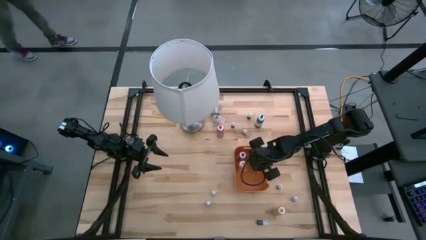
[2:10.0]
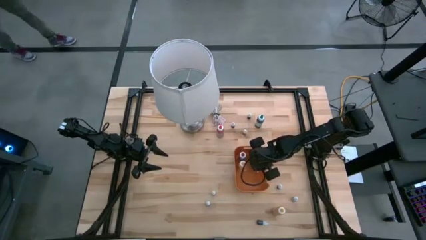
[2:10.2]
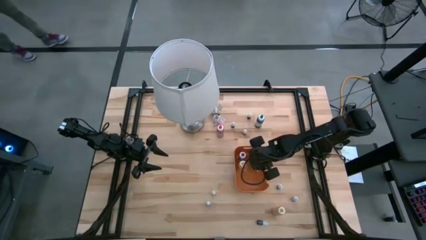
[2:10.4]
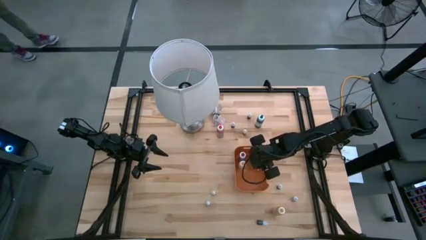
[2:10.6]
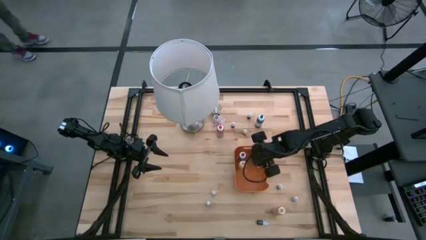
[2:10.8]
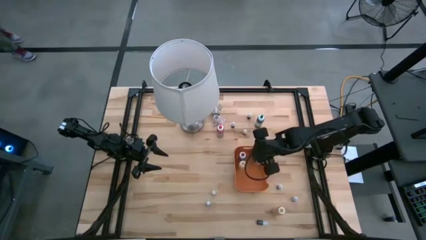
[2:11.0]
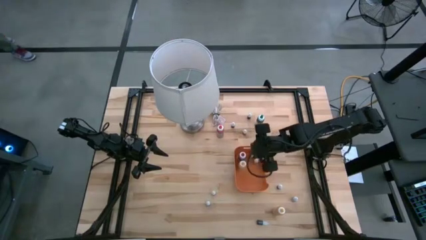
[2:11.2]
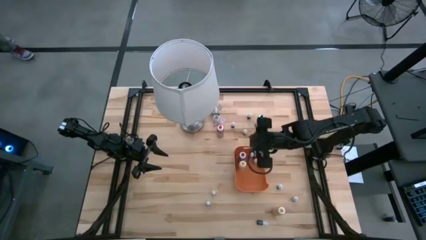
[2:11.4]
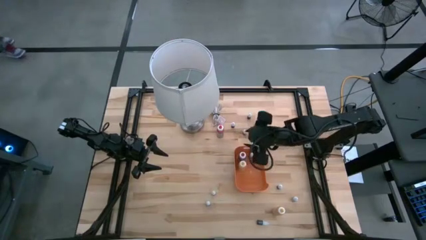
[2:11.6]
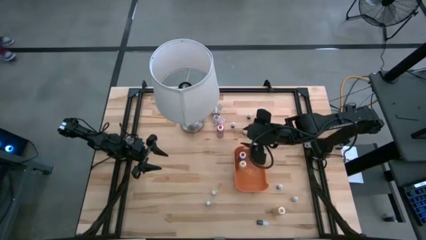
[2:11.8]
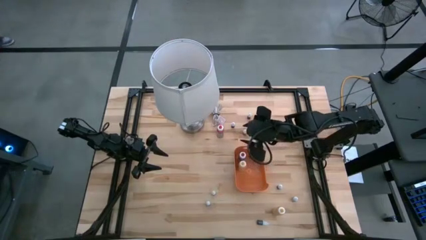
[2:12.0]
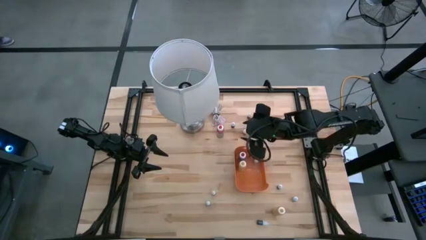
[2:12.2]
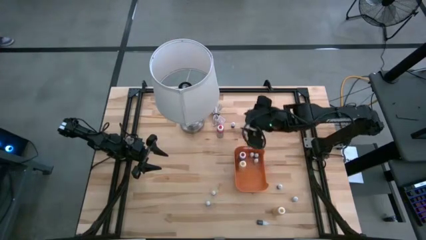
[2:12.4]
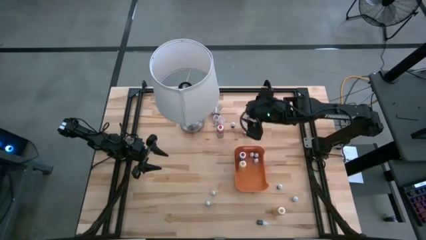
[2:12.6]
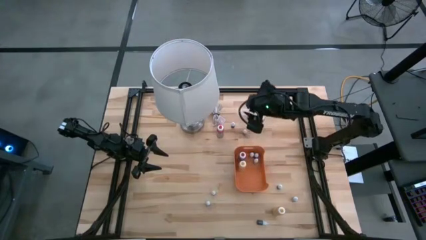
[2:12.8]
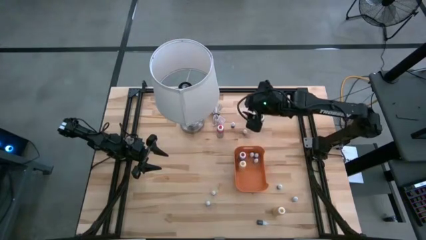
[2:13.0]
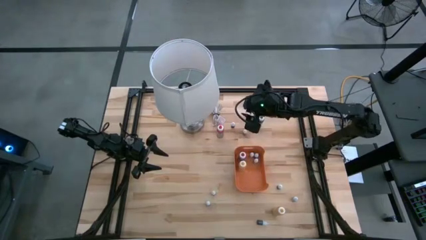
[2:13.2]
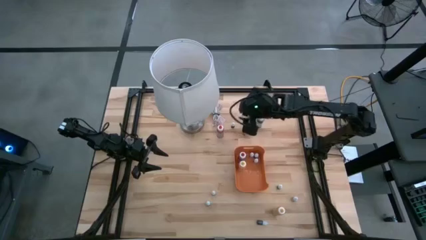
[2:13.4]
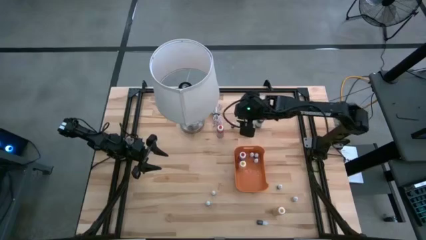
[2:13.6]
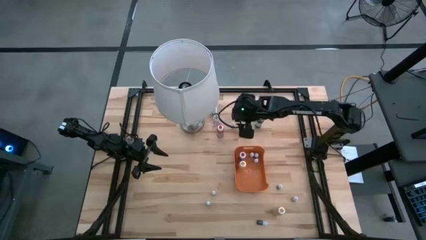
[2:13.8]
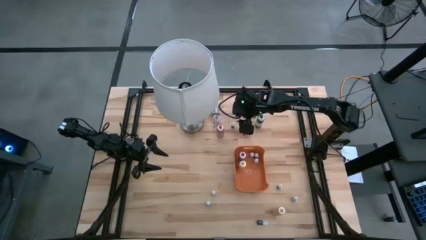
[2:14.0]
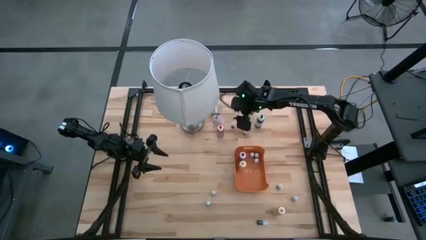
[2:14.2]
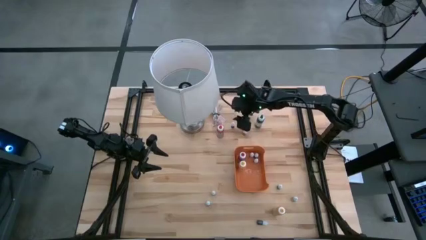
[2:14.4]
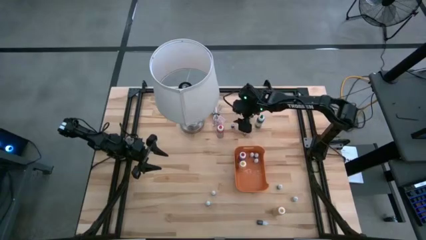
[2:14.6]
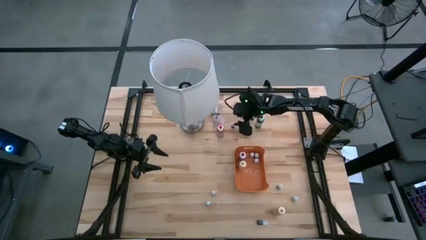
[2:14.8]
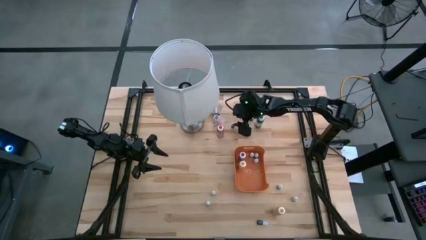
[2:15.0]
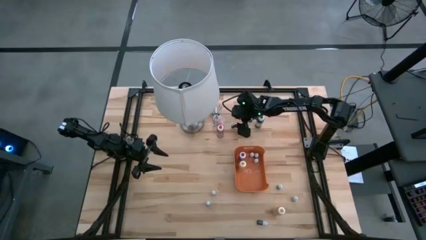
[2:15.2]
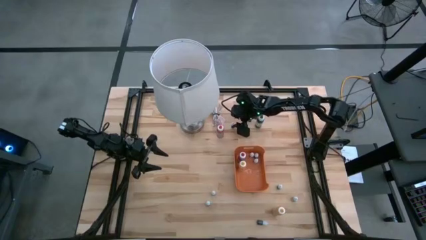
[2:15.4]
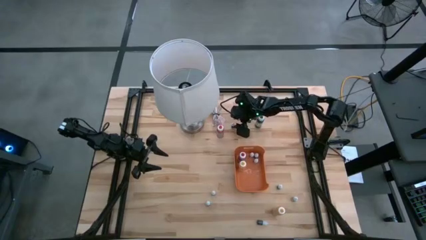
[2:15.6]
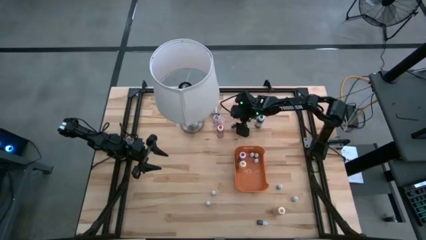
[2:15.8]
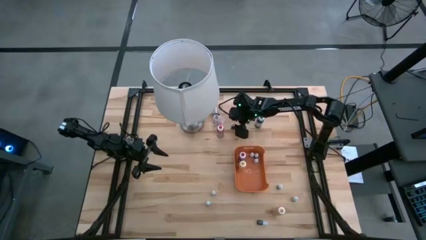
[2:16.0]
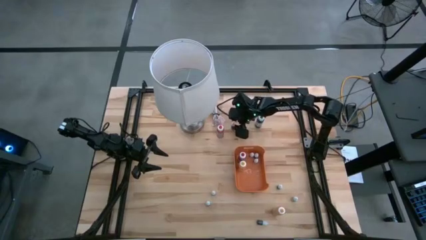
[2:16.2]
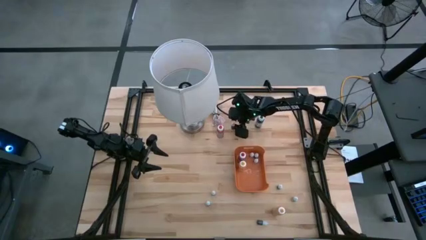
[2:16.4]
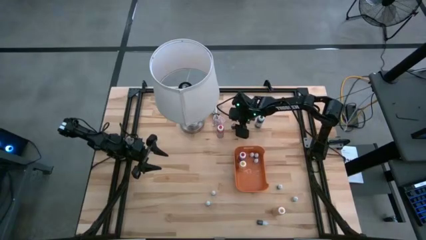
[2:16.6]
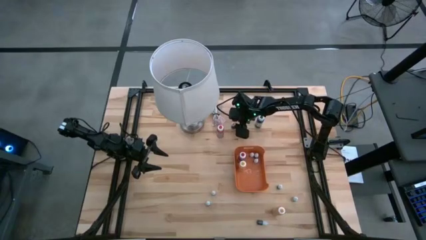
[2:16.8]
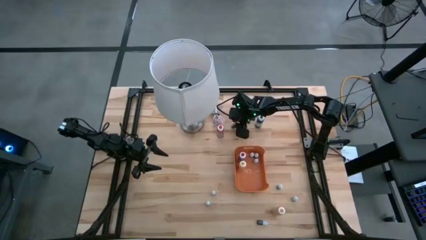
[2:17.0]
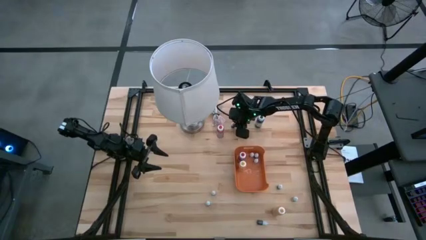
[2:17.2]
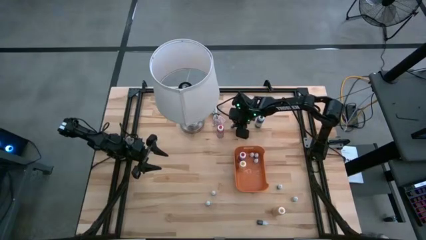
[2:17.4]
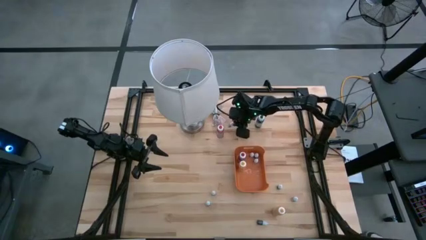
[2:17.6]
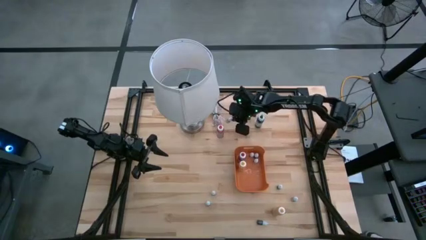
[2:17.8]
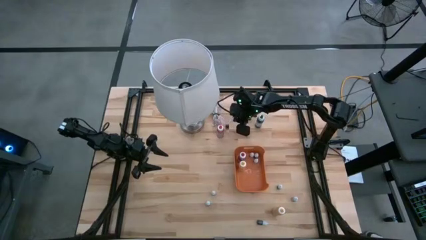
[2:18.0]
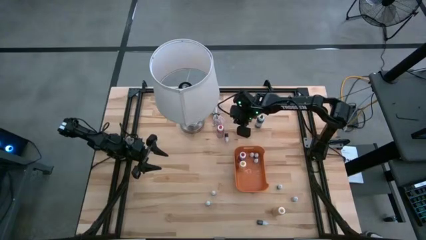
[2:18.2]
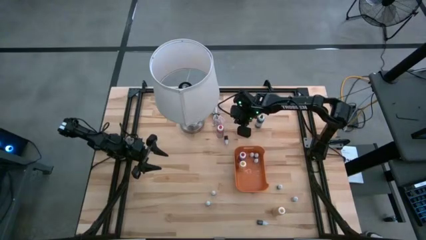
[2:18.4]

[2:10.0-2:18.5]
Task: Pick & Place food coloring
Put the small food coloring bottle into the orange bin

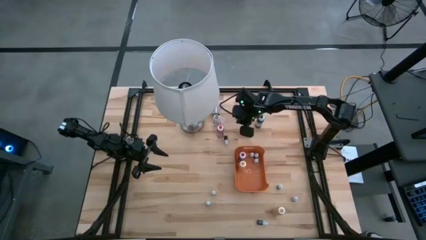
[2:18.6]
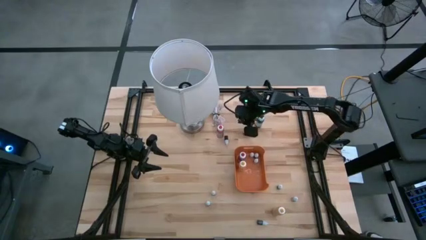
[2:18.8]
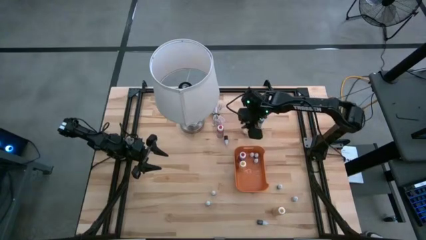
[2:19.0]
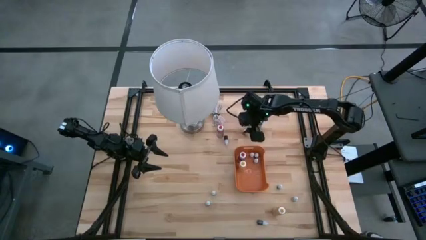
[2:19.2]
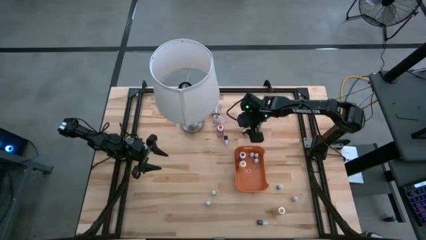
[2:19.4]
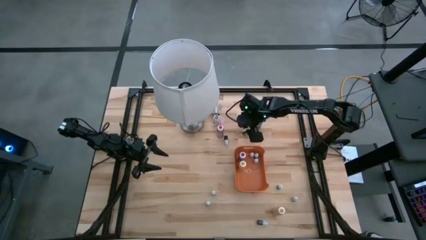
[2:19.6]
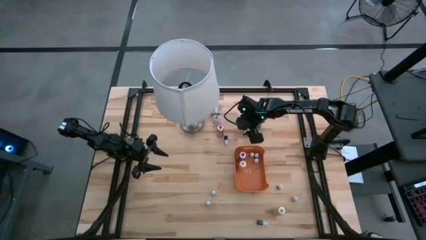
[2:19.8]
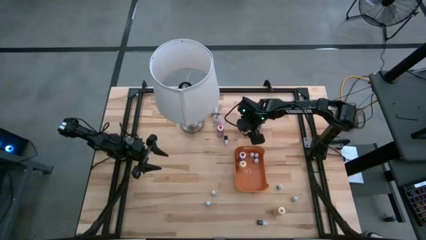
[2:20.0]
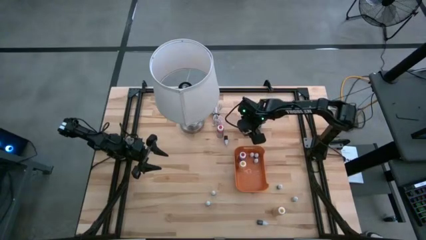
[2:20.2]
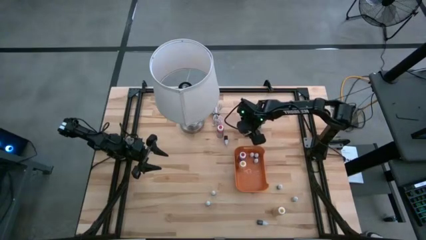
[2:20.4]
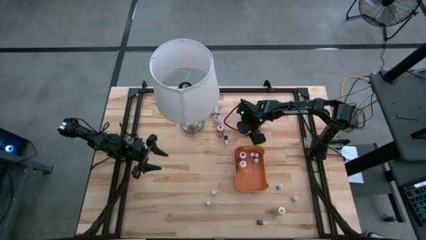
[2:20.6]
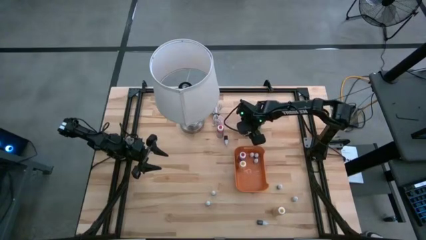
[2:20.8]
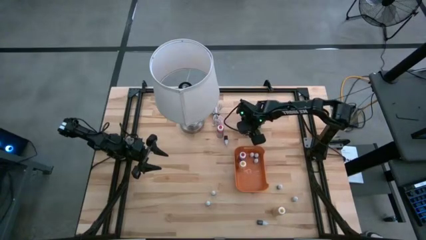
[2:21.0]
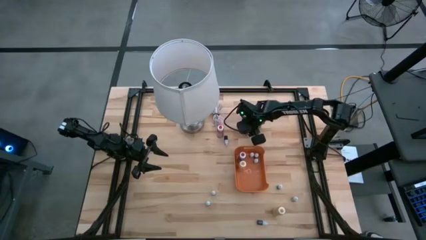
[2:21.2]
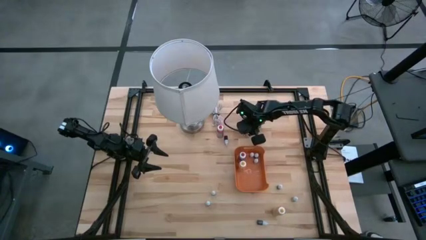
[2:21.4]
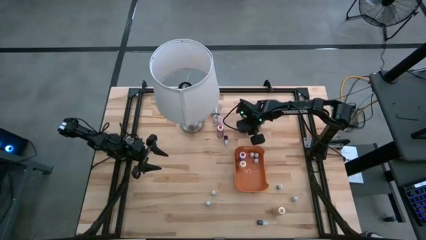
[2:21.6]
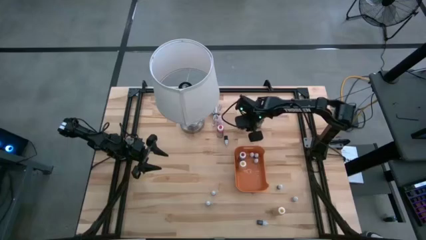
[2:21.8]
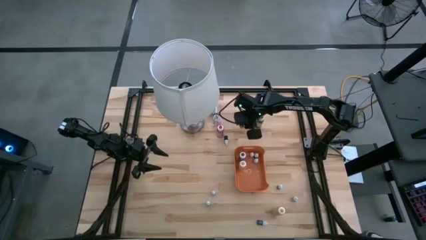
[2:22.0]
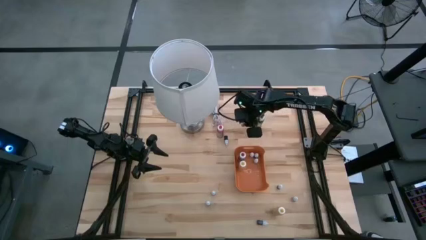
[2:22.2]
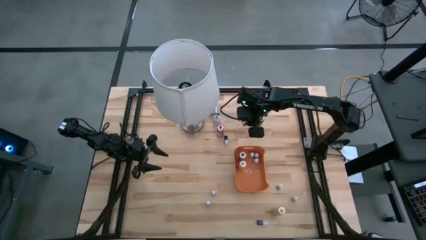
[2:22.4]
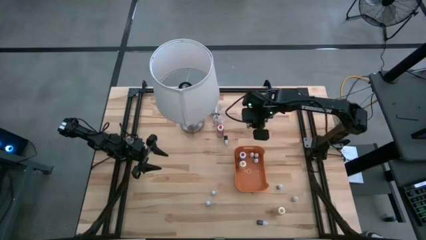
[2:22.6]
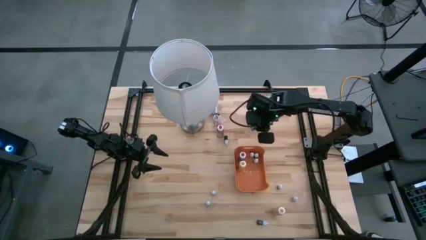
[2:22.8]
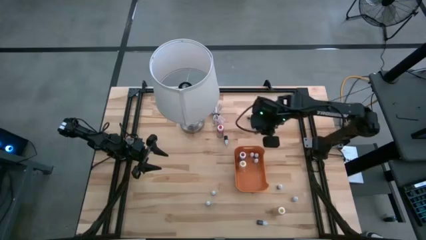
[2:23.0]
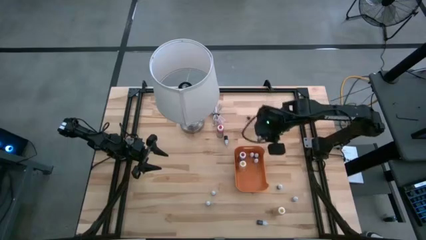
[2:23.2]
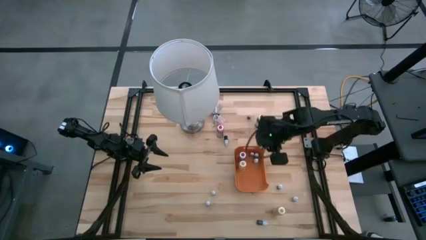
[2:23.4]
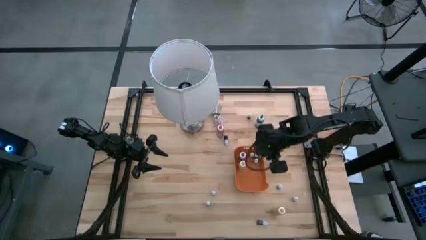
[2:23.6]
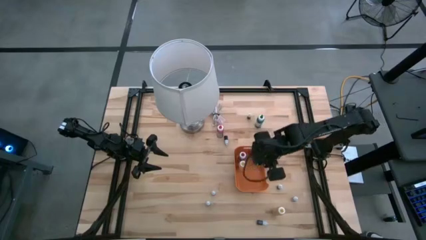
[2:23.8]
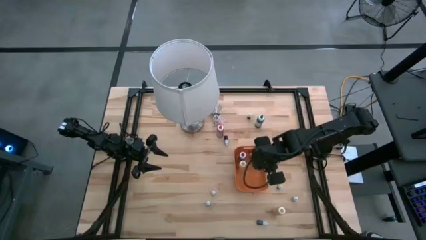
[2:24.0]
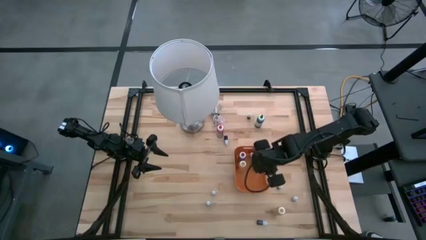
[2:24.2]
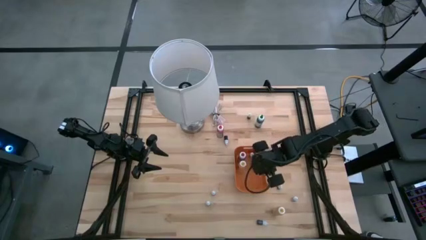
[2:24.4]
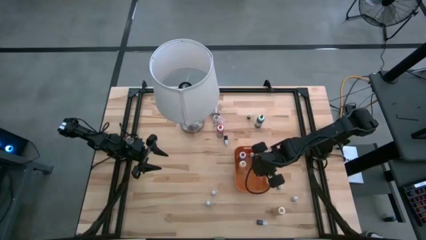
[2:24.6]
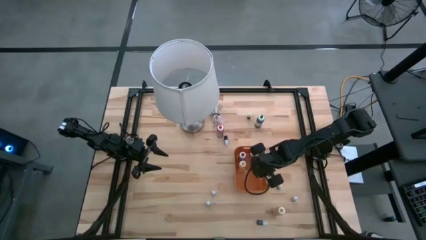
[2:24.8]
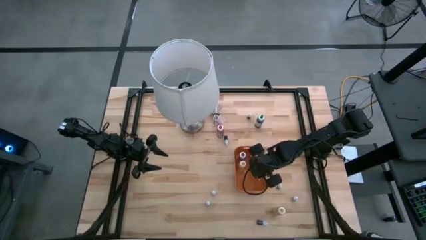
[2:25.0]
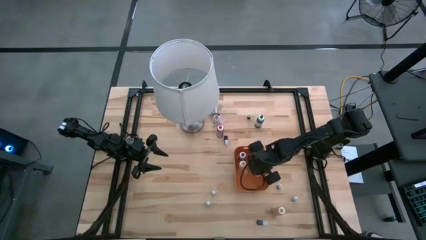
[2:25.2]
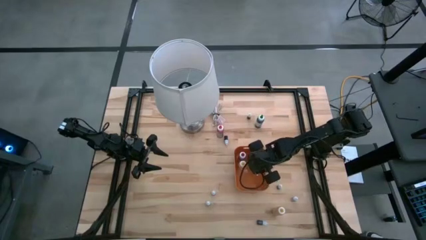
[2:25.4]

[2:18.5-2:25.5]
Put the small food coloring bottle into the orange bin
